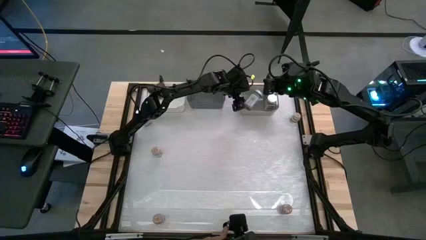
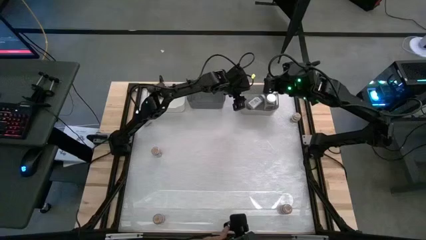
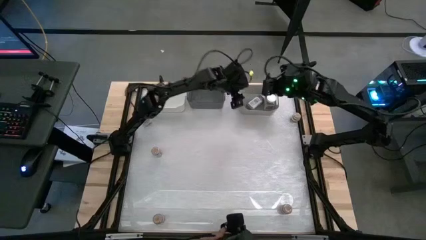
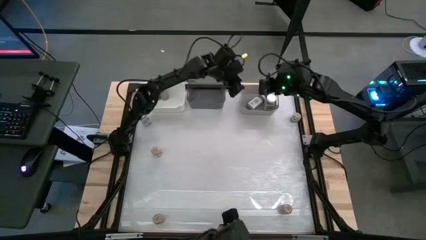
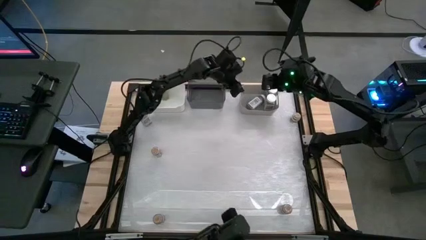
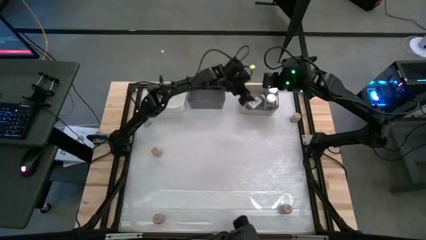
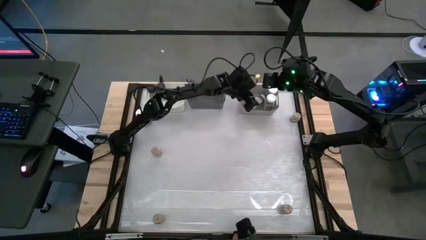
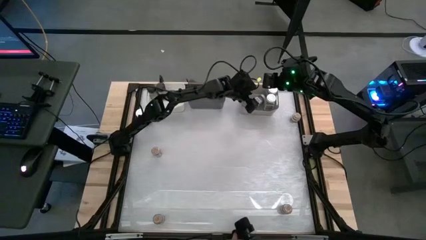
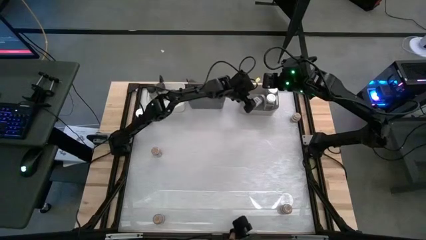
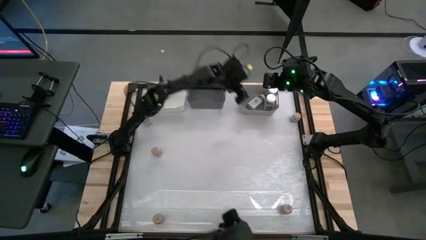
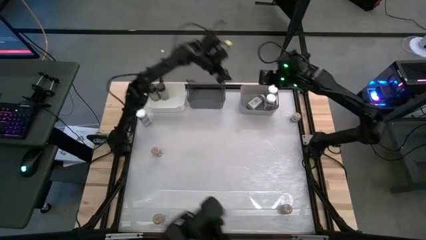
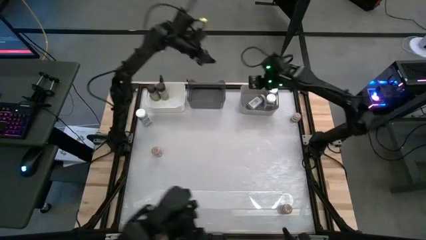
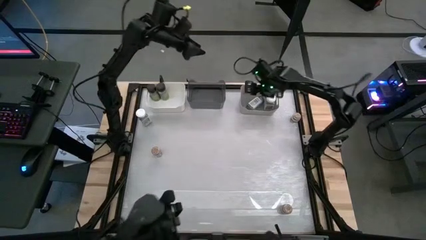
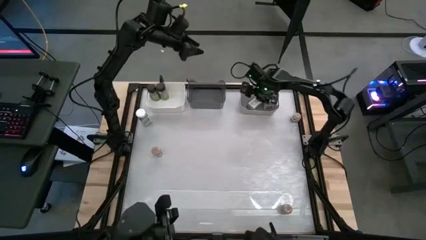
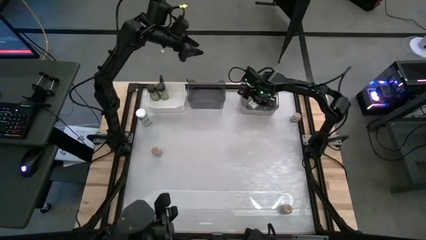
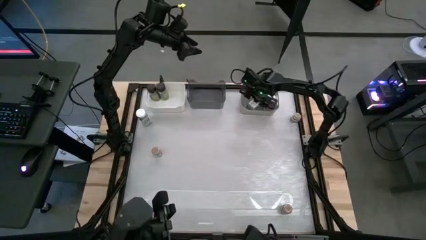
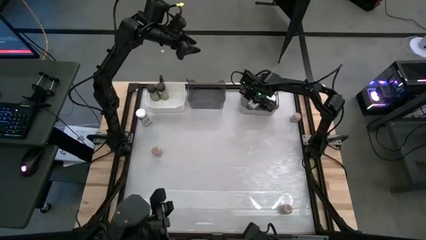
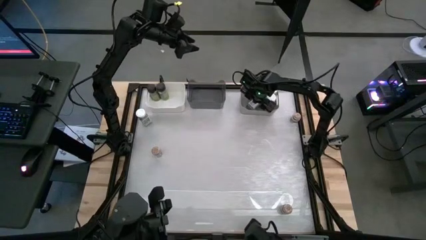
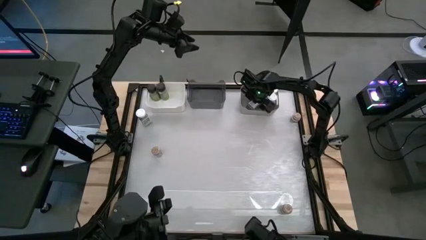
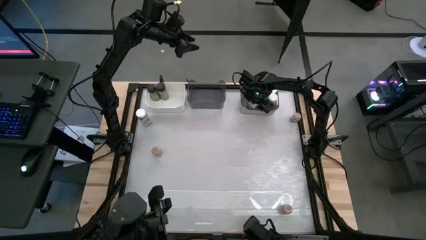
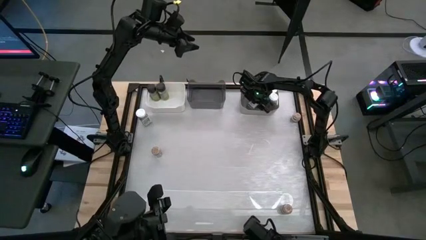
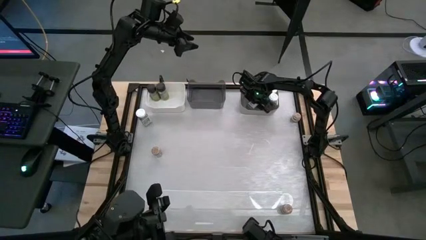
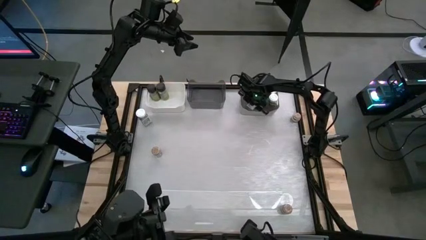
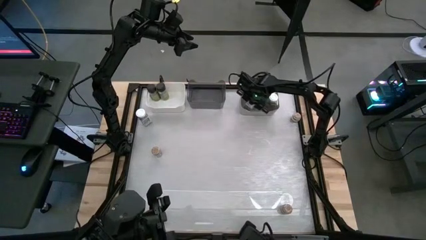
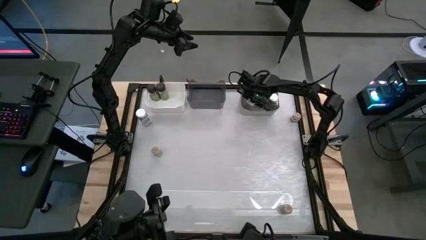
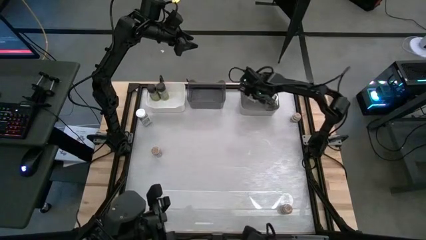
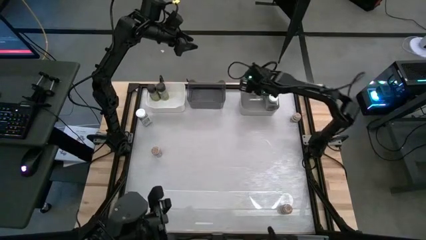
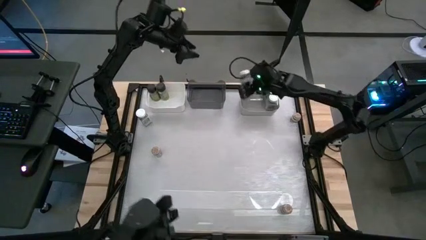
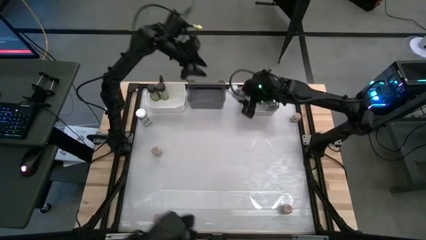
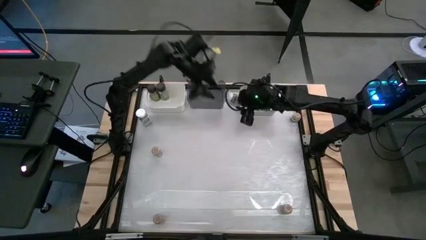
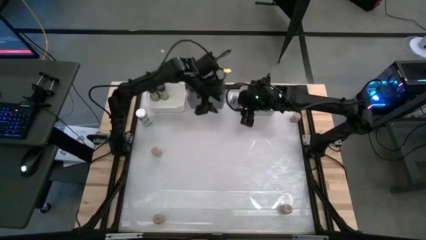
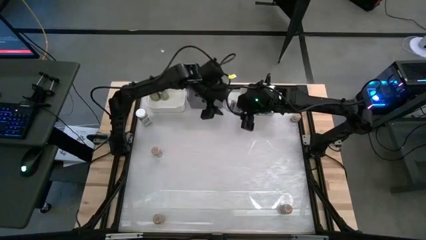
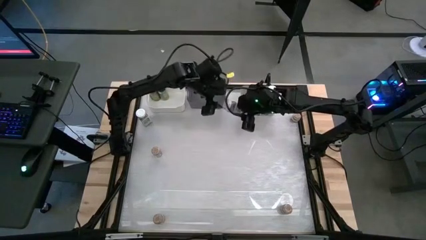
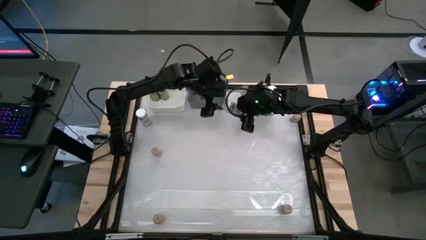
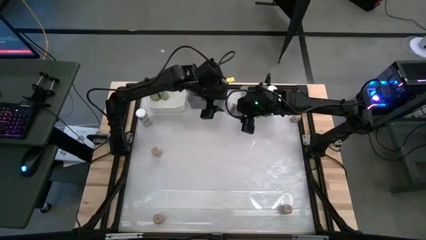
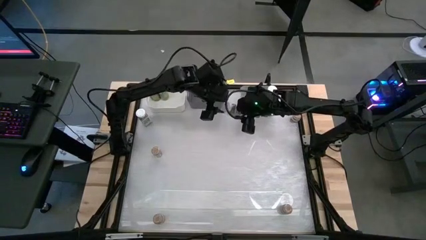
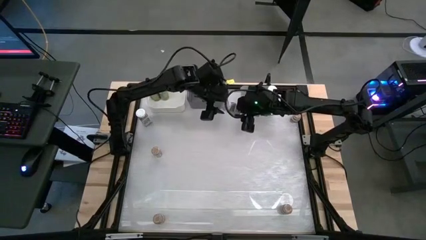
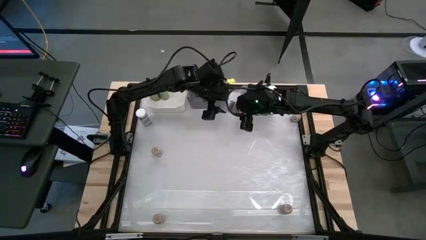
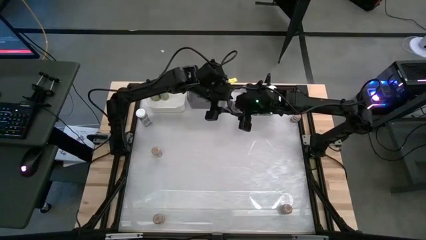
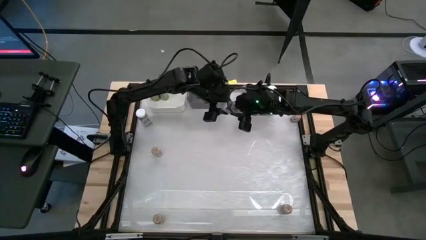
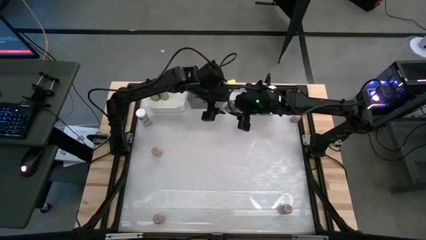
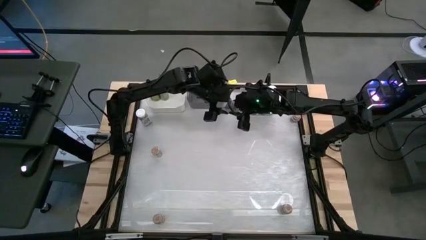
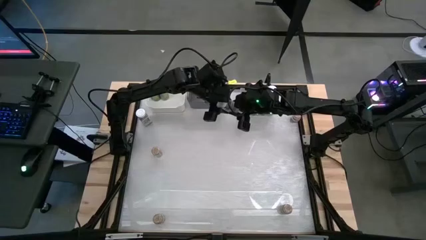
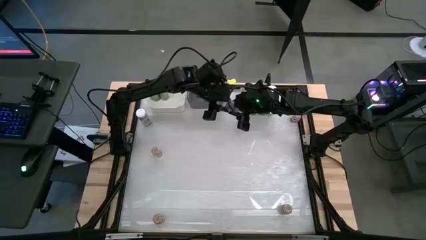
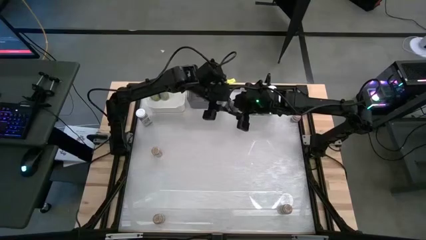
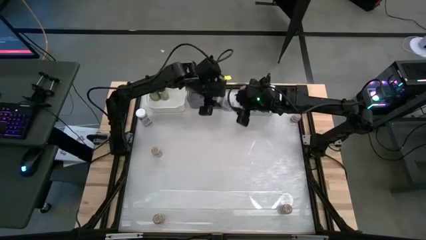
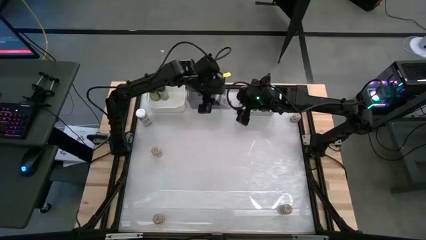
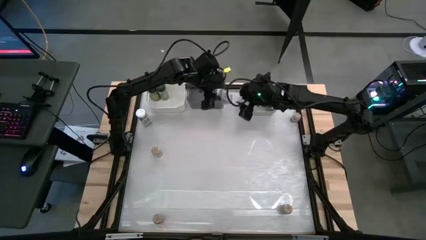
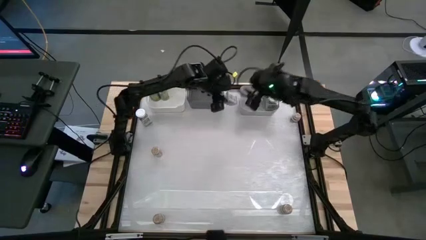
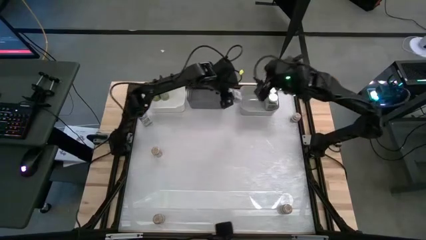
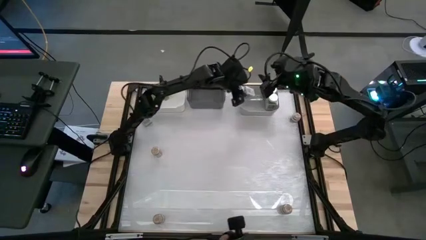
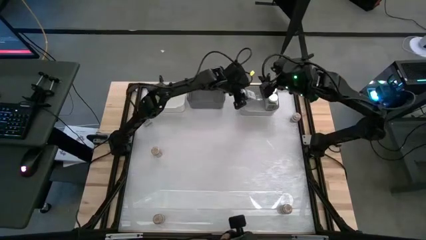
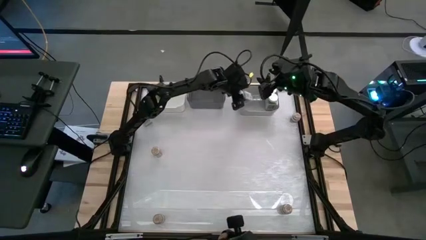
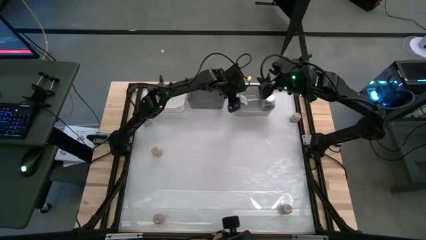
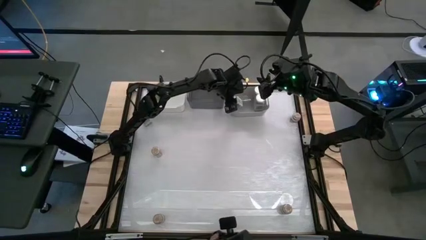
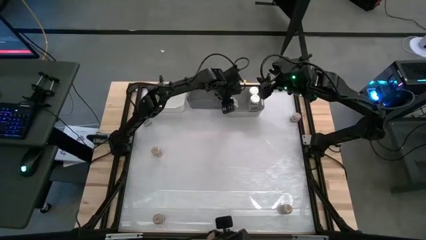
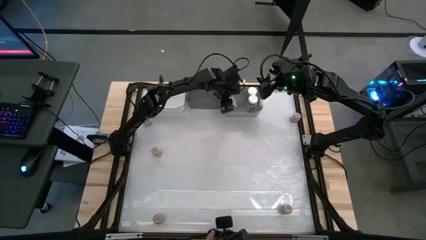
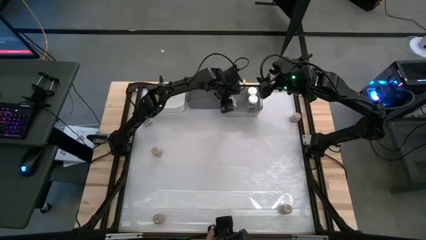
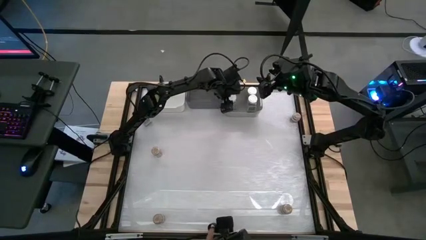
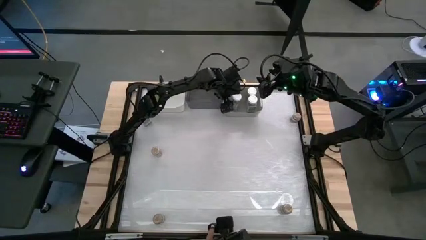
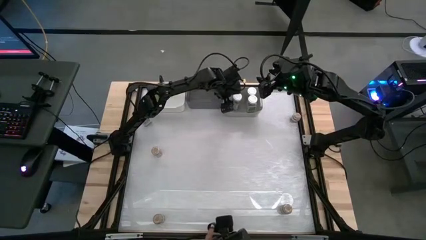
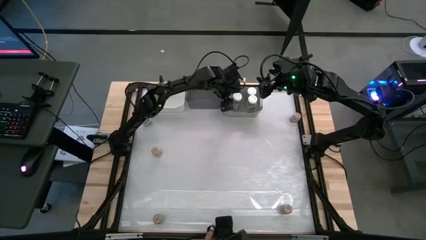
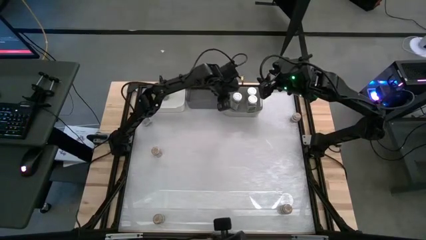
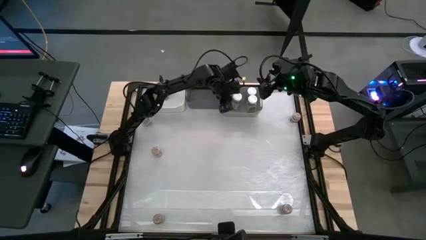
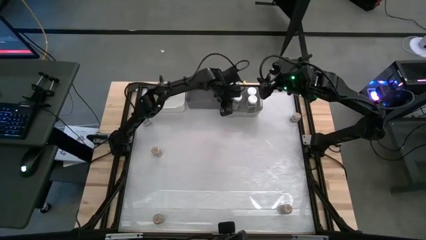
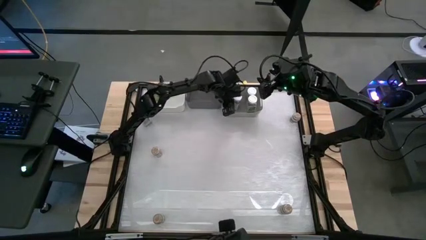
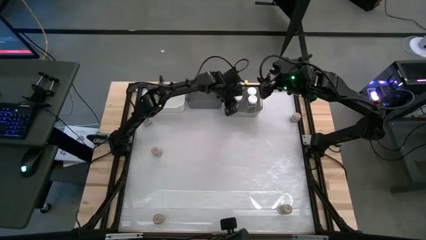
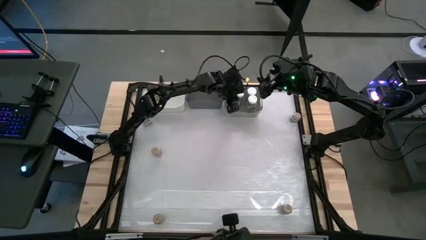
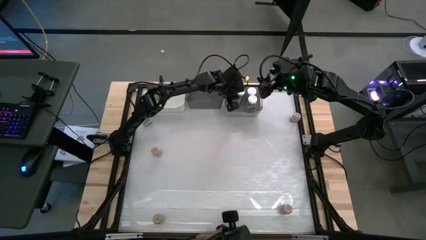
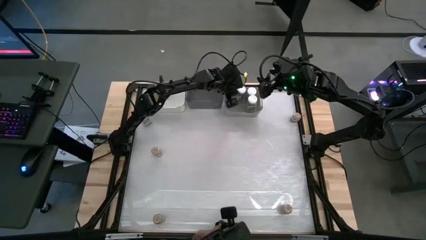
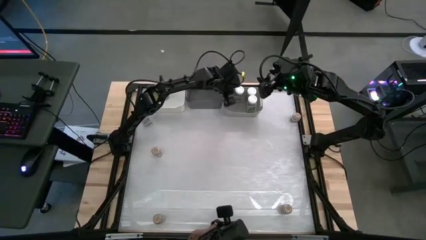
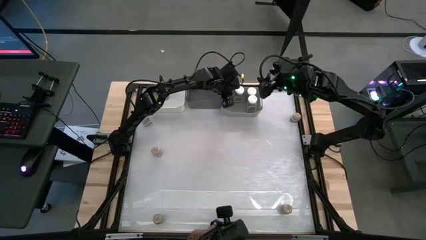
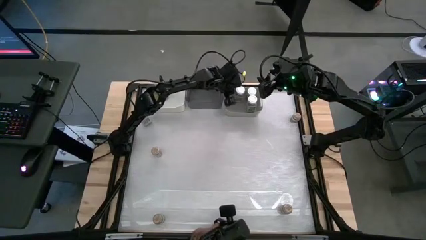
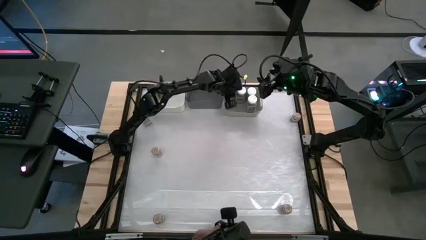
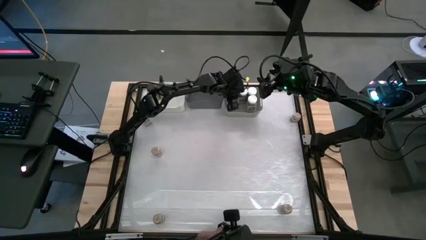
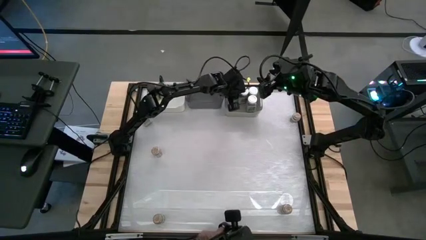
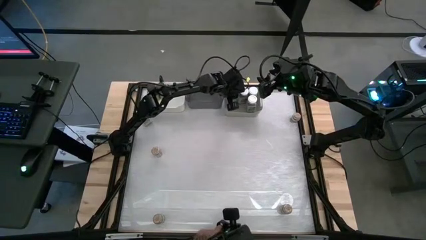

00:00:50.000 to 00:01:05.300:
Task: Sort spices by type
Put the bottom white seasoning bottle into the gray bin
